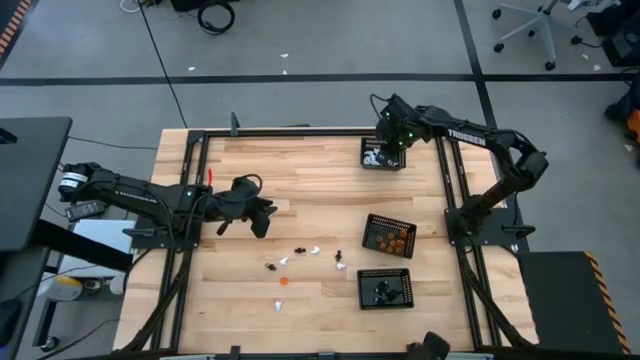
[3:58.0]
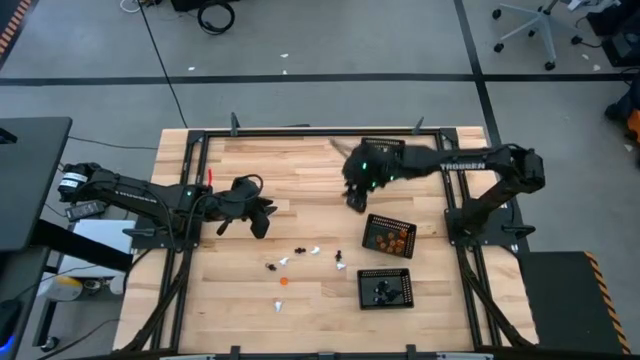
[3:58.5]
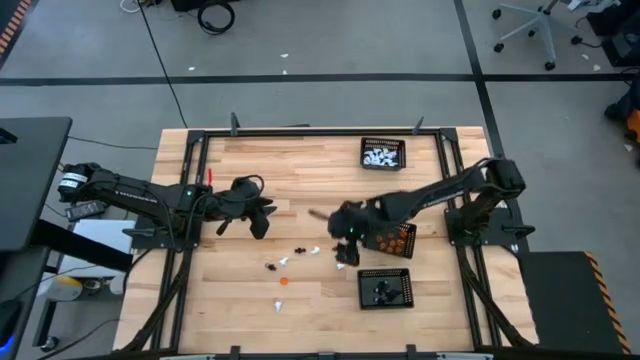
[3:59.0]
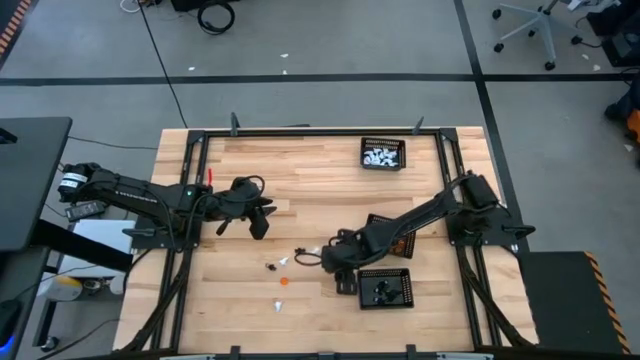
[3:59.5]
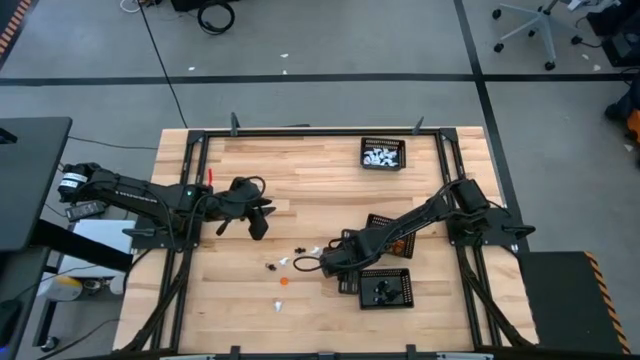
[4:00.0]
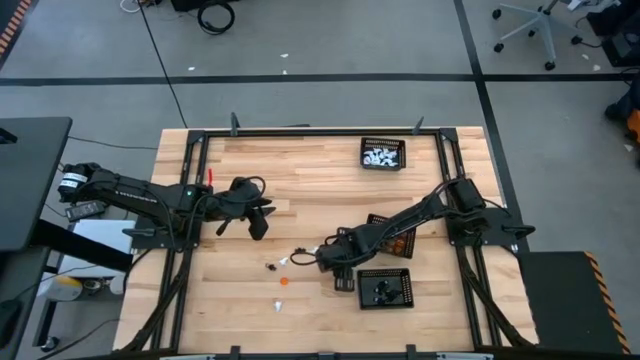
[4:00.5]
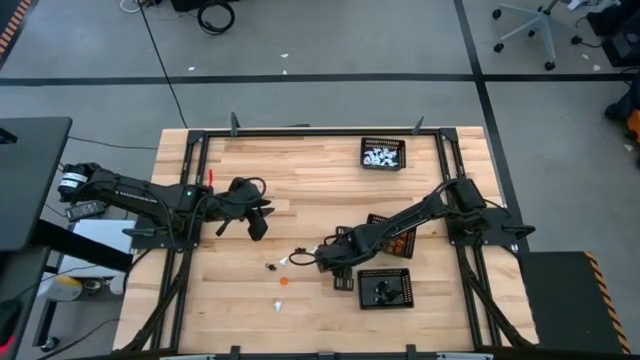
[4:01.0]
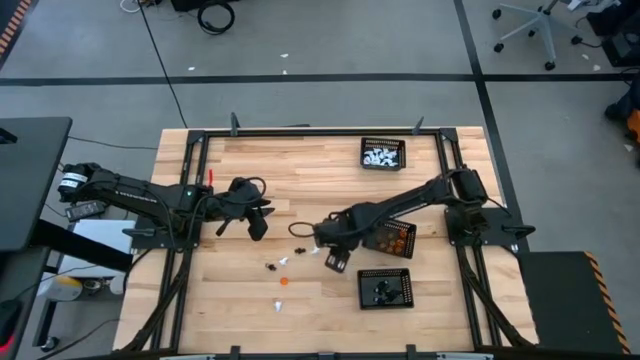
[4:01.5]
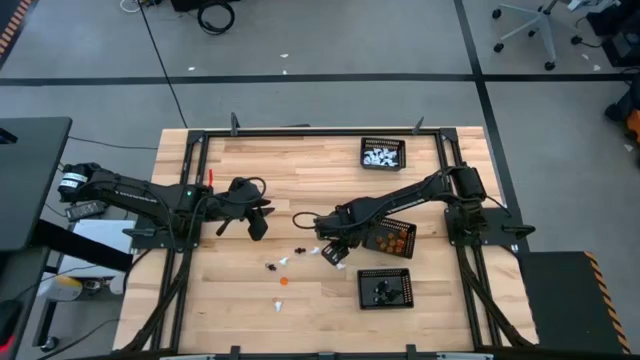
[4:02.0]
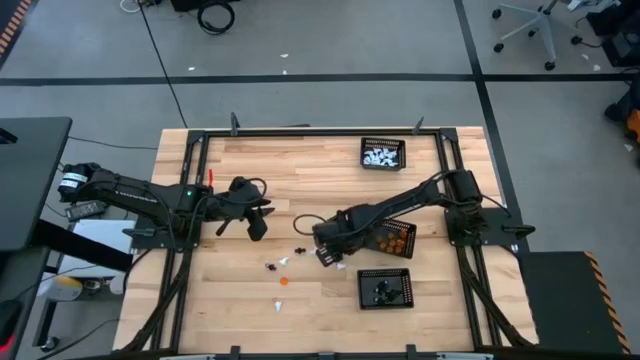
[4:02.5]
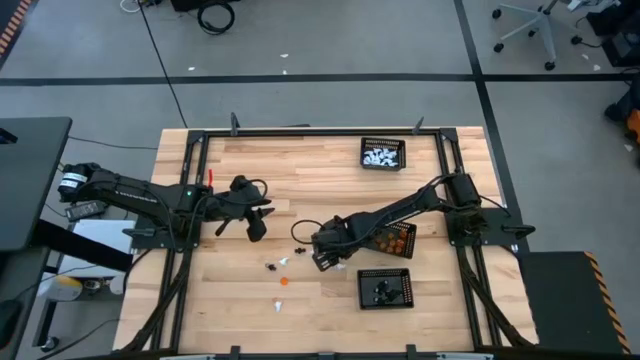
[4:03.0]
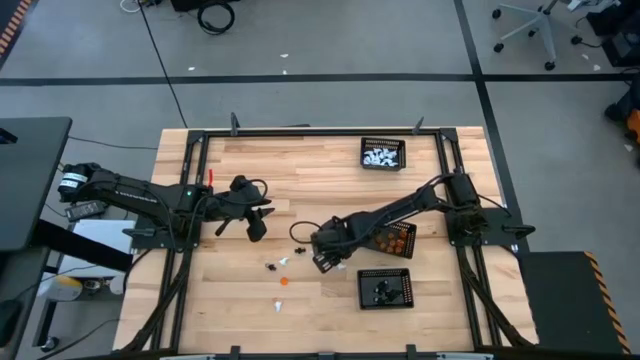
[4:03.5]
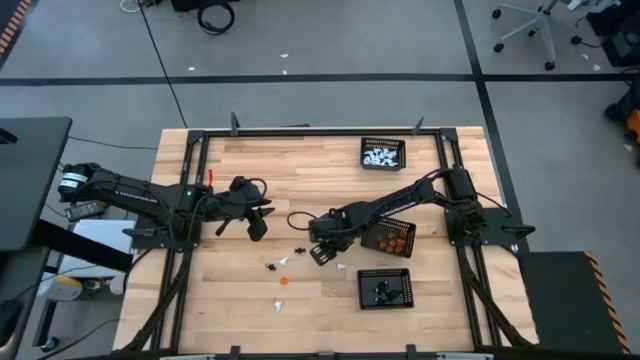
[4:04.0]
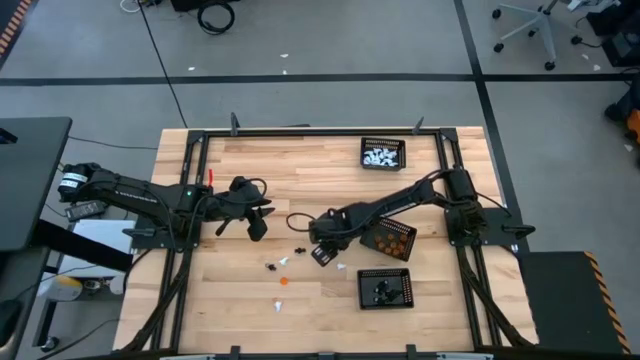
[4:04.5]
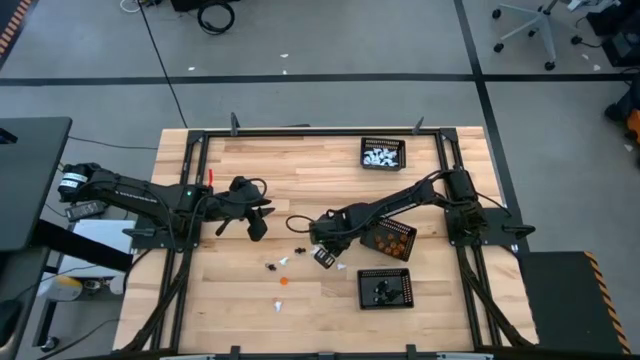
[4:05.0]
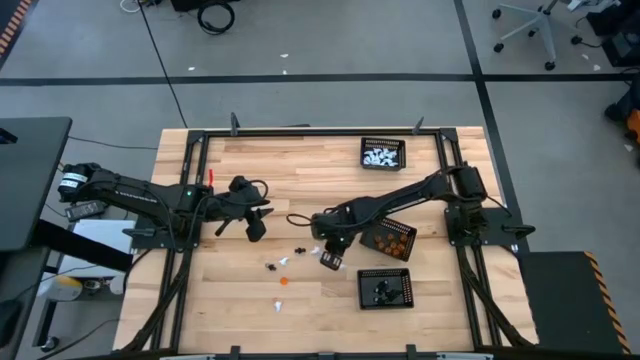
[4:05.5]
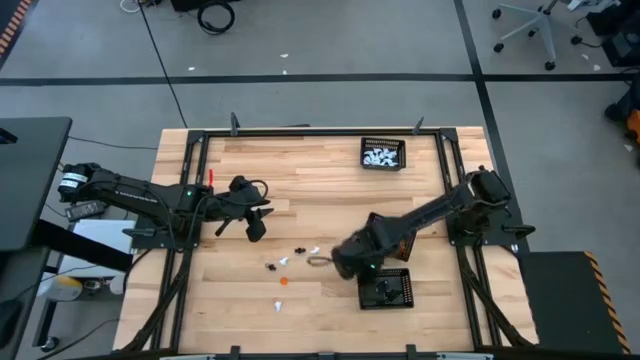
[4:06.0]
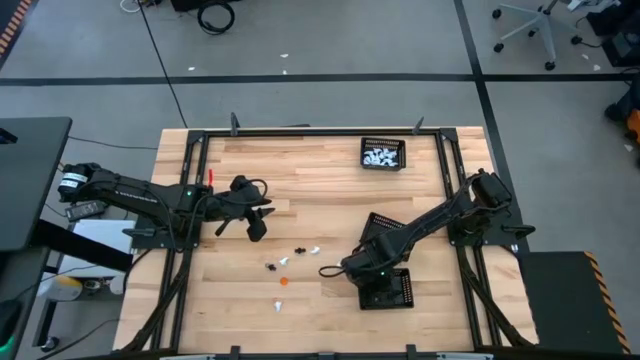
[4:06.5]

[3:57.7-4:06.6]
Task: Sort Halloween decoration
Put the black skeleton toy into the bottom black bin

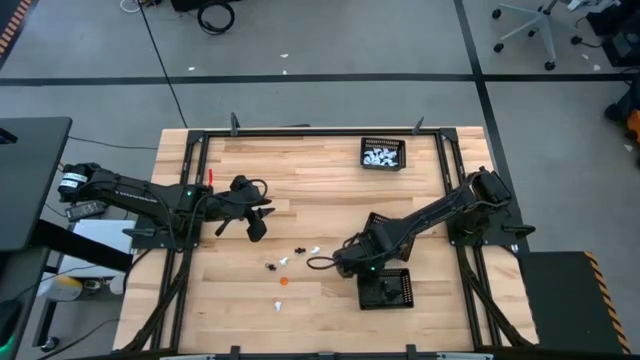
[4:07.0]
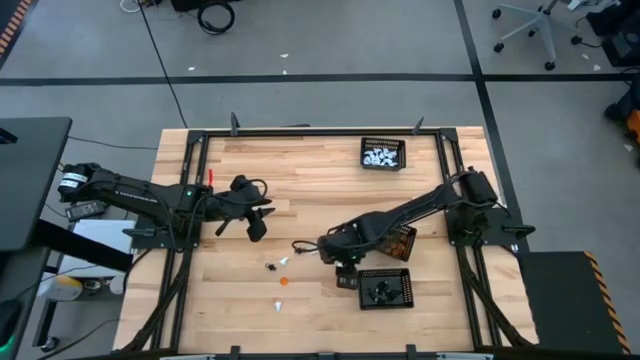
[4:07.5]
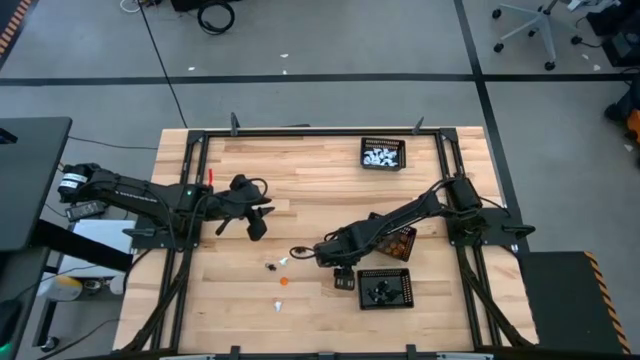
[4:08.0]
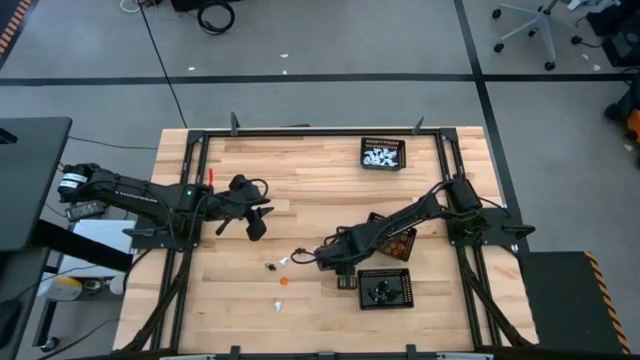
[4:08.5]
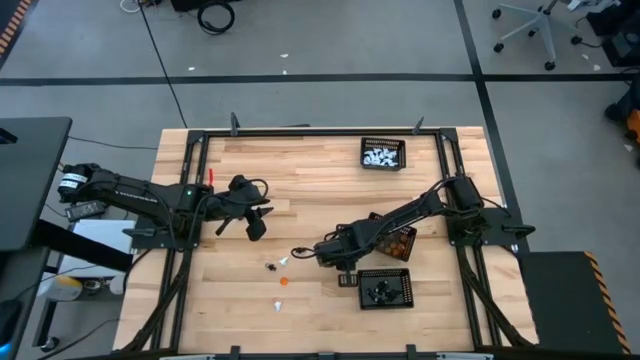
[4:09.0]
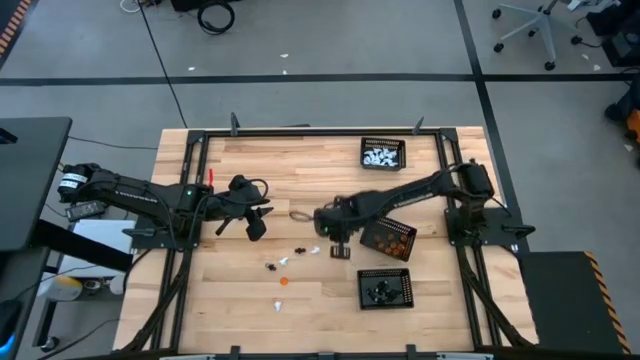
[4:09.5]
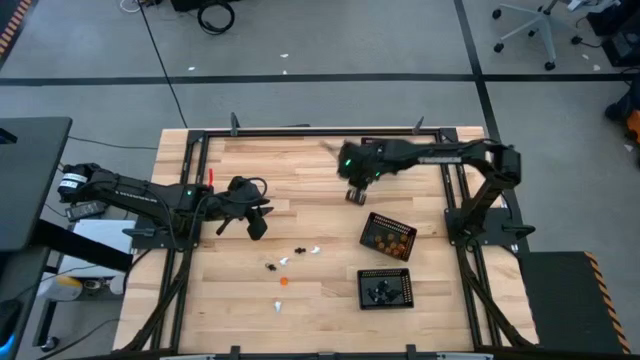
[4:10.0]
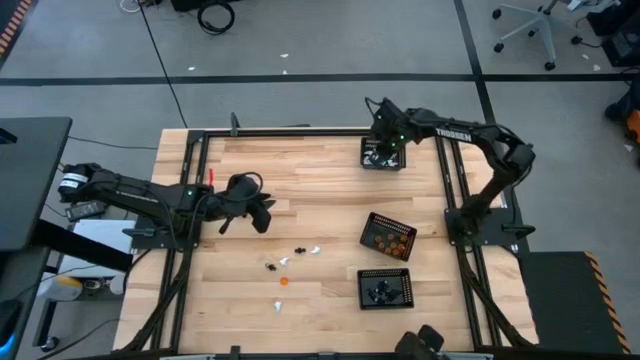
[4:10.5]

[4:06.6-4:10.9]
Put the white ghost toy into the top black bin

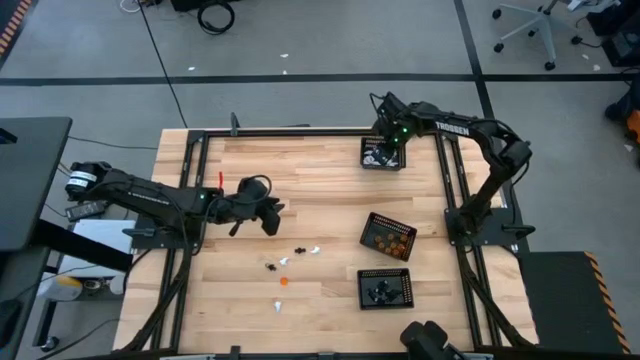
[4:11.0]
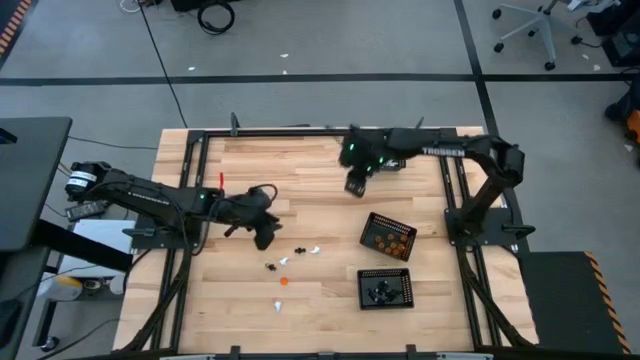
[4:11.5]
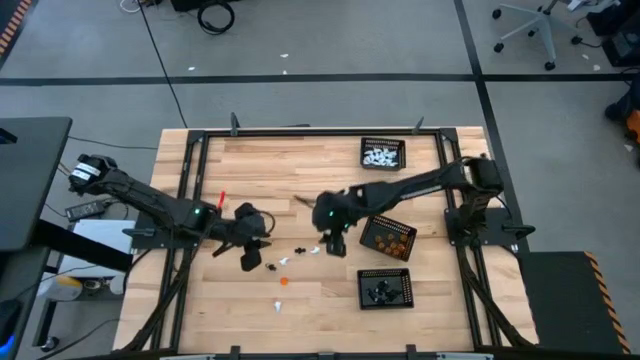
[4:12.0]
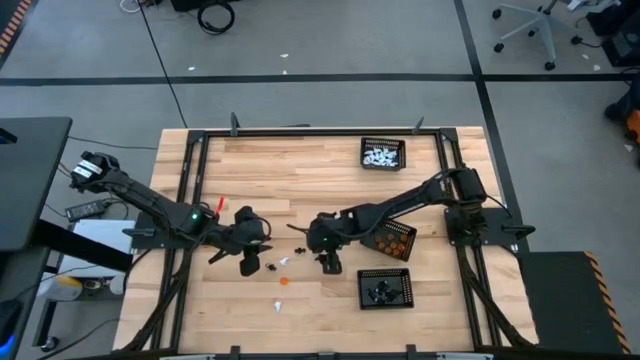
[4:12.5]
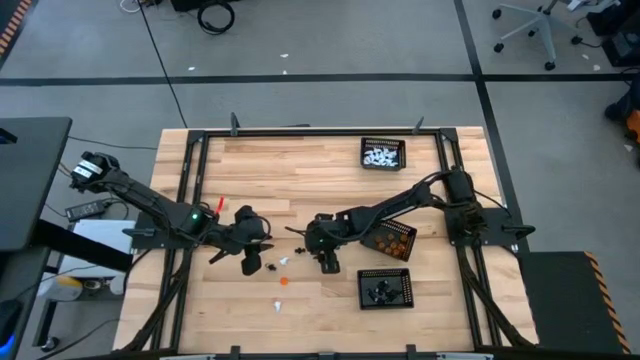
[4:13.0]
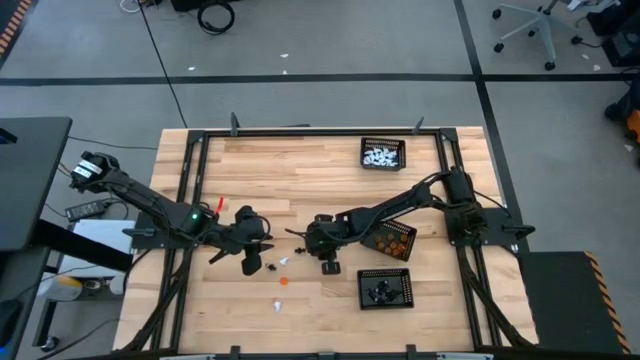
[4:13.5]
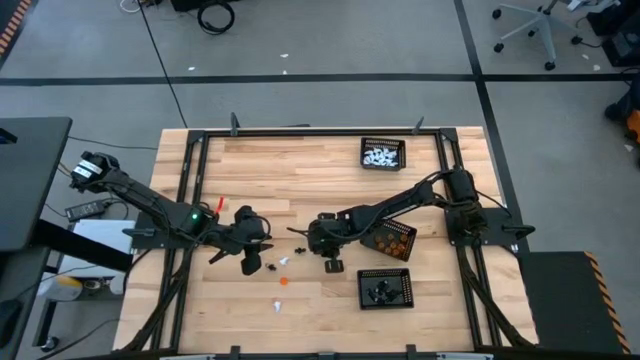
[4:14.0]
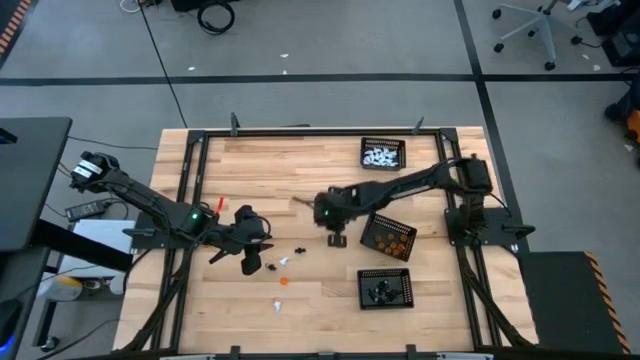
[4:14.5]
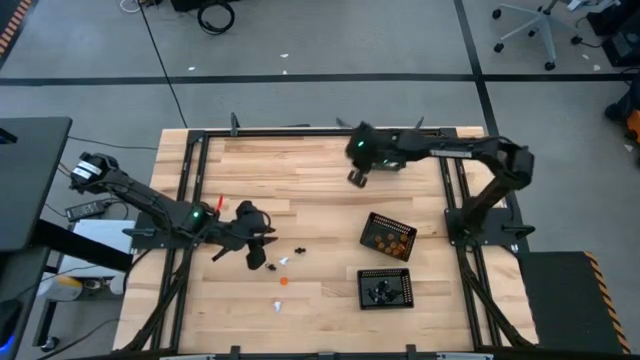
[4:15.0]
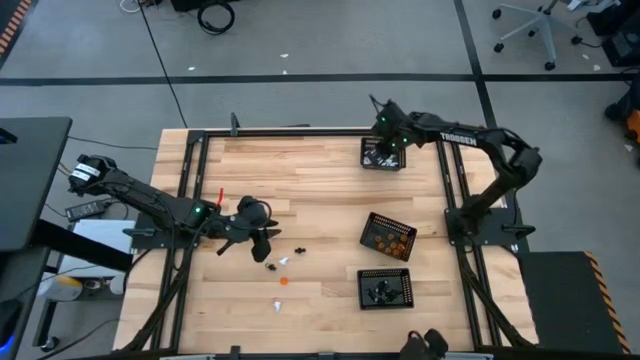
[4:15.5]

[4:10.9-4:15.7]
Put the white ghost toy into the top black bin

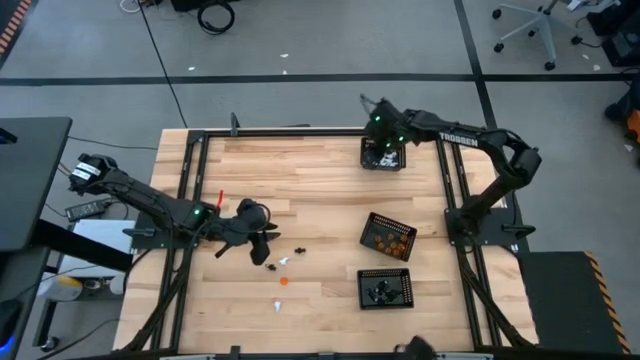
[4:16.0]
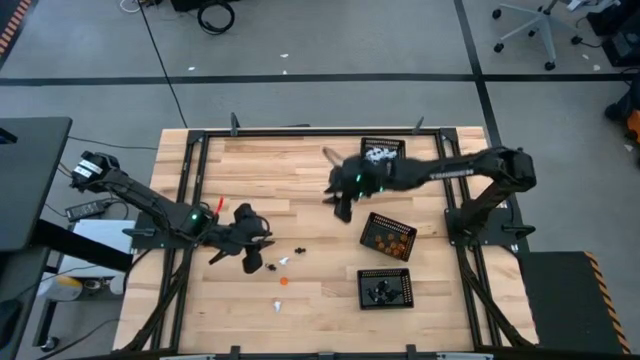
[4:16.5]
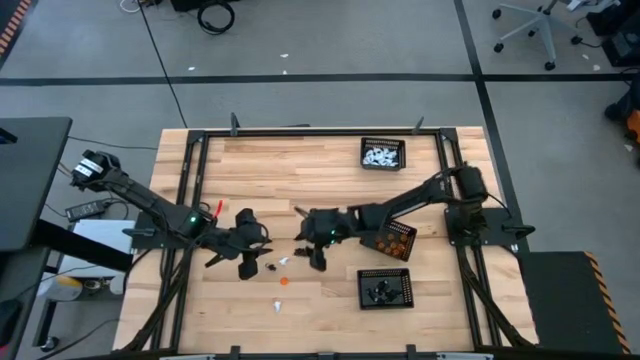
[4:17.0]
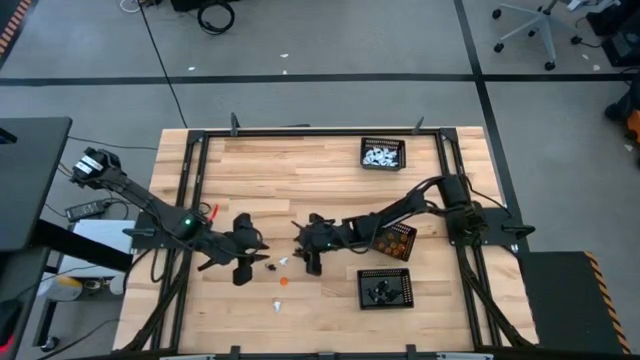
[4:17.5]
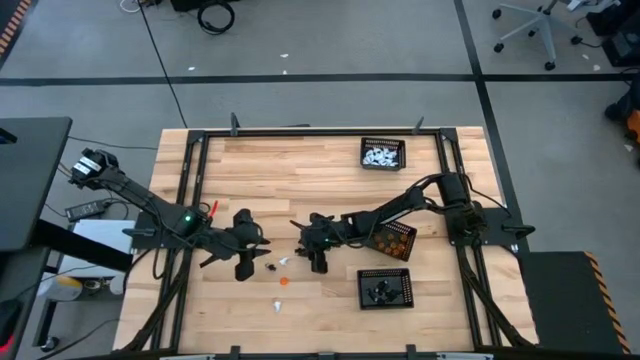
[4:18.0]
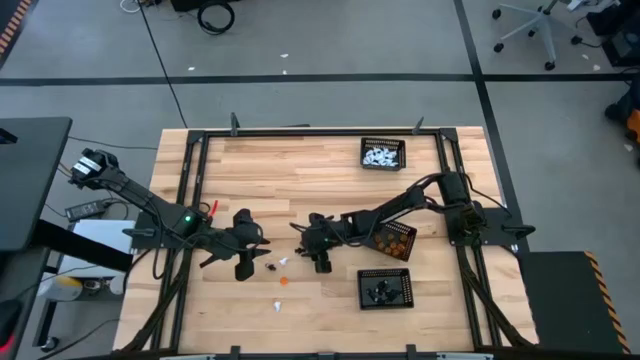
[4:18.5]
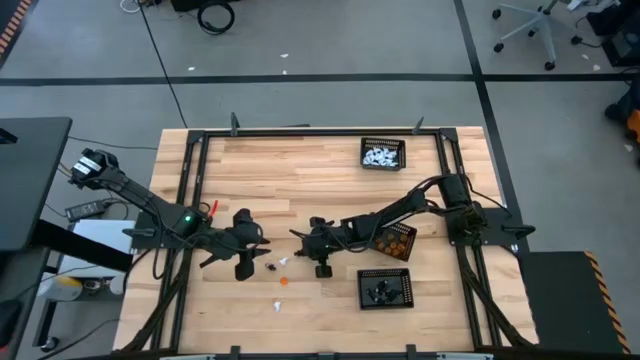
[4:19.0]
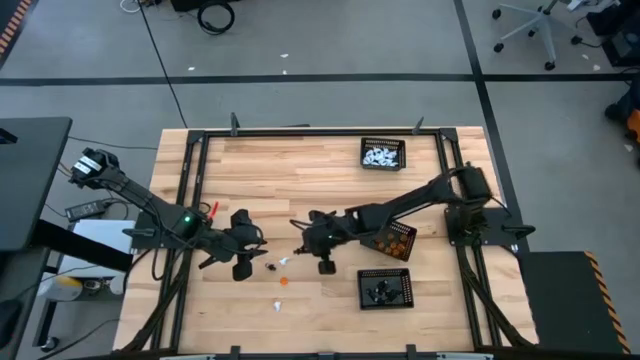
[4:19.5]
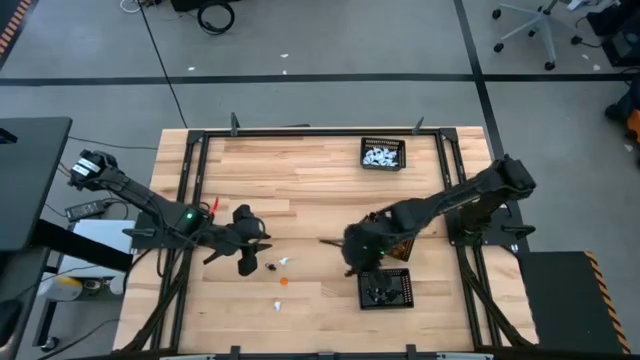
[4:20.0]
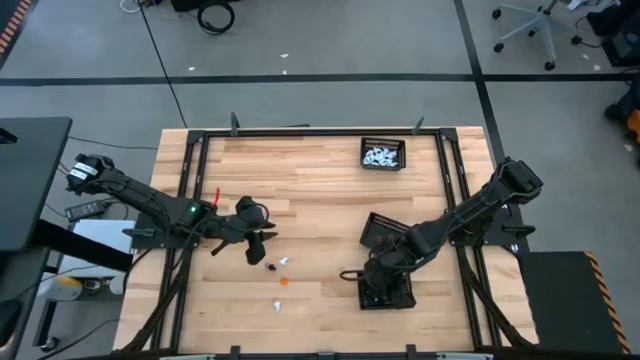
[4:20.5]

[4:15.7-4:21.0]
Put the black skeleton toy into the bottom black bin
